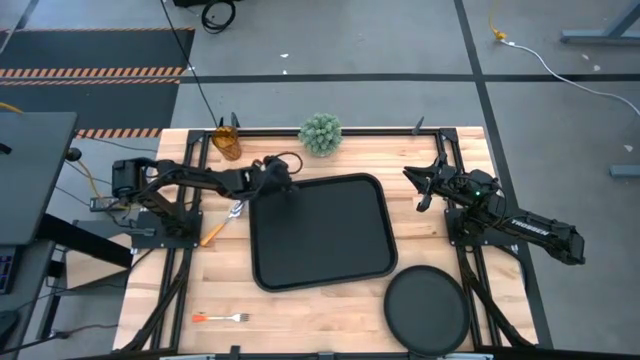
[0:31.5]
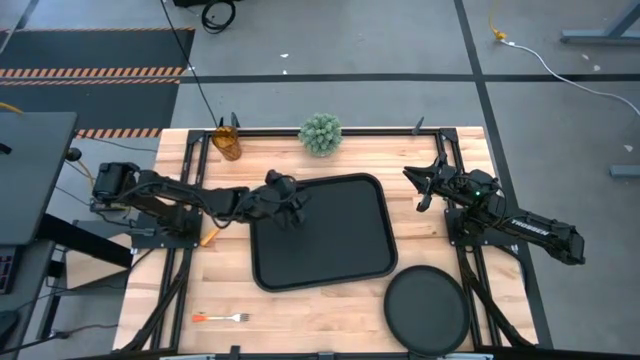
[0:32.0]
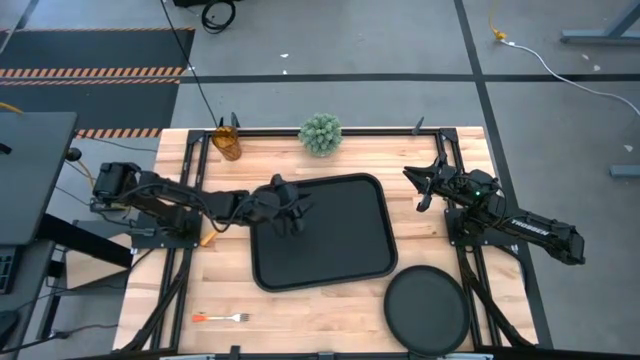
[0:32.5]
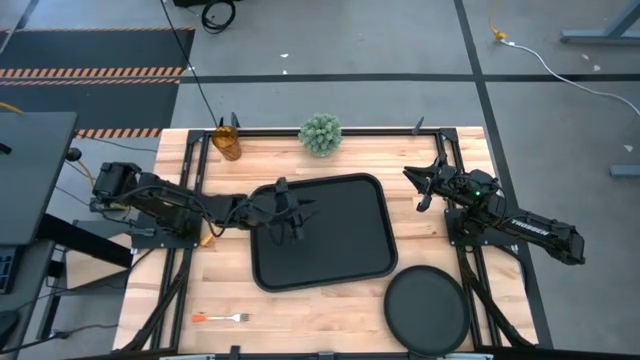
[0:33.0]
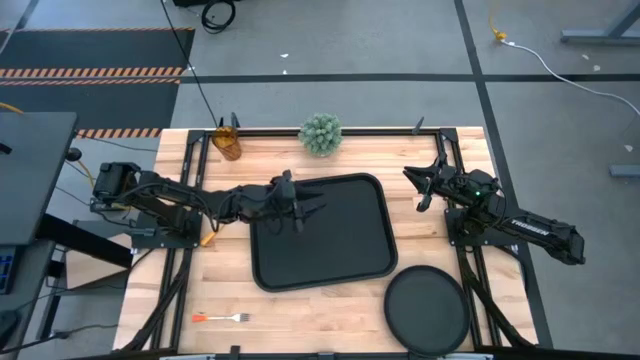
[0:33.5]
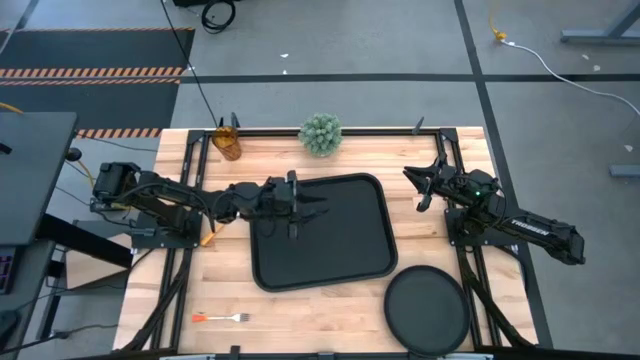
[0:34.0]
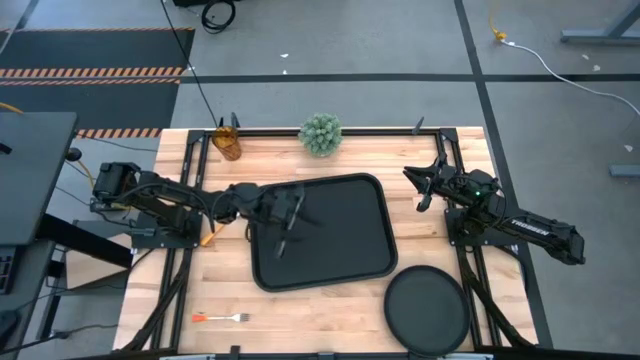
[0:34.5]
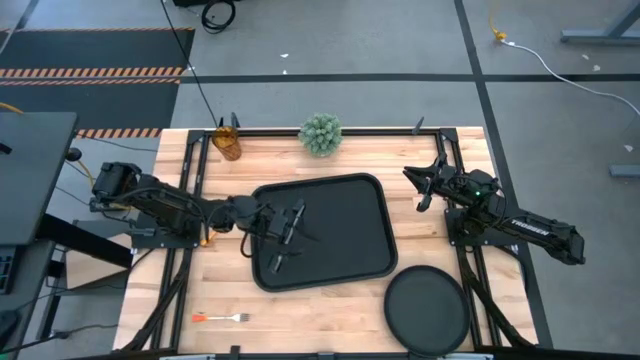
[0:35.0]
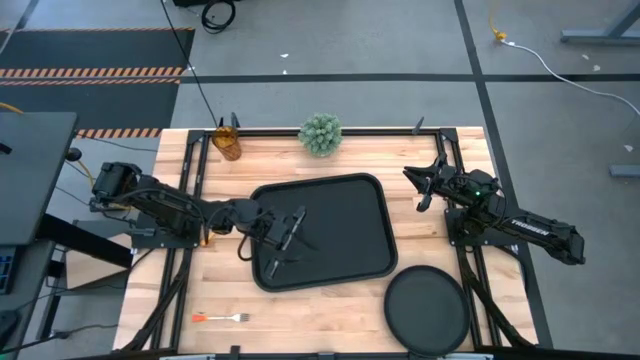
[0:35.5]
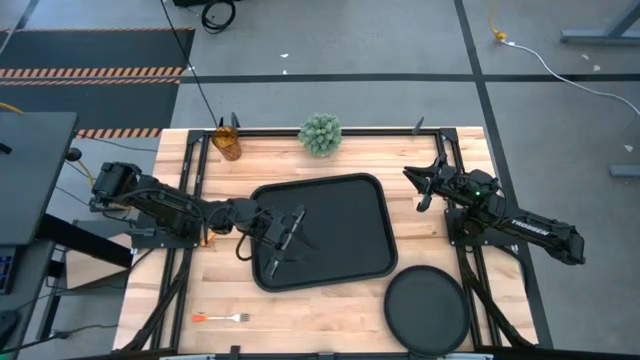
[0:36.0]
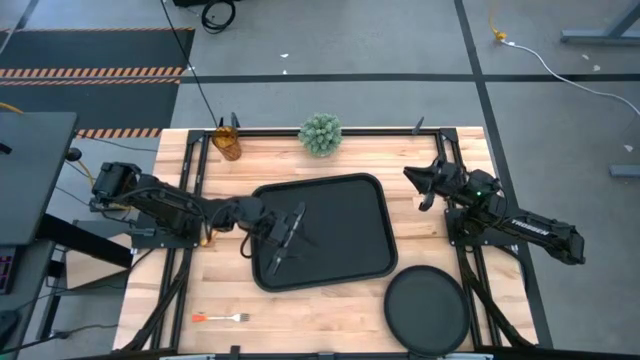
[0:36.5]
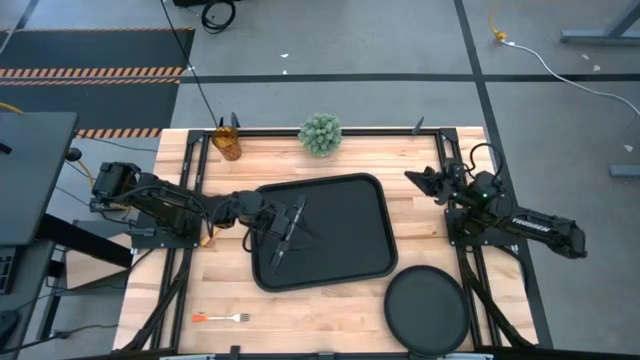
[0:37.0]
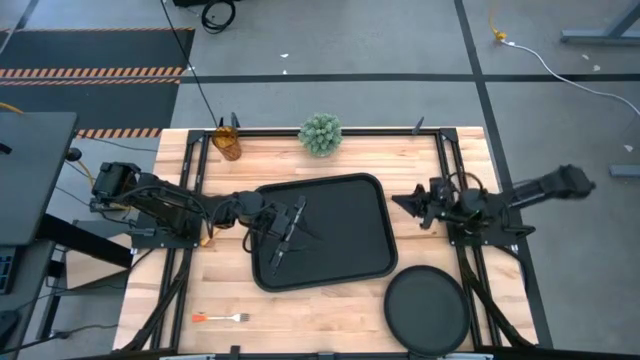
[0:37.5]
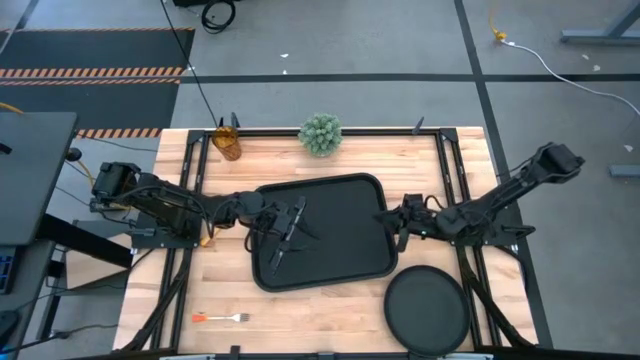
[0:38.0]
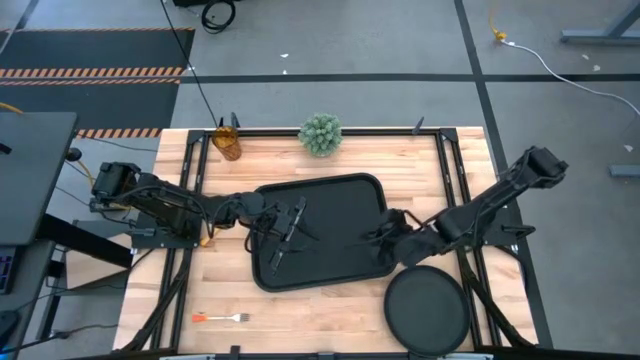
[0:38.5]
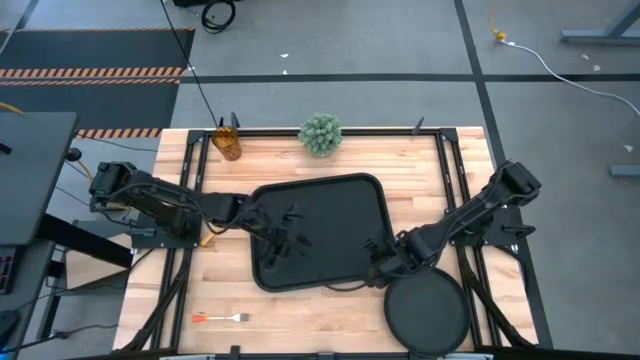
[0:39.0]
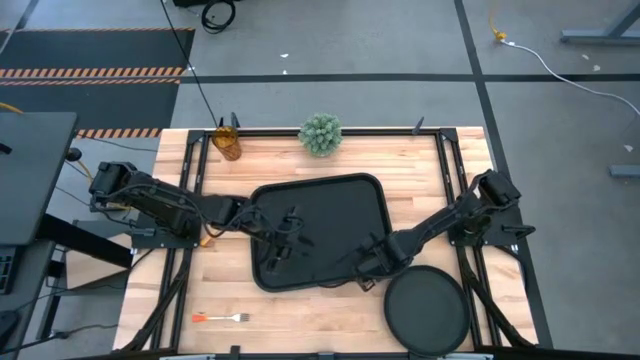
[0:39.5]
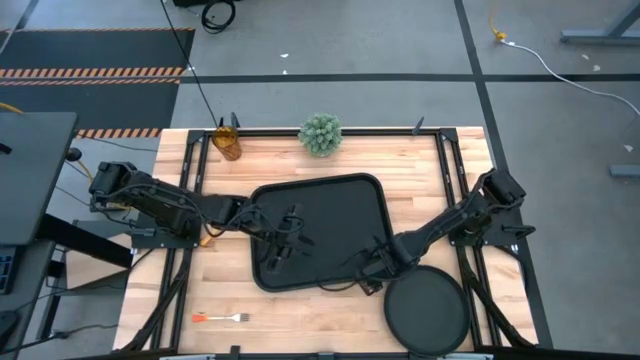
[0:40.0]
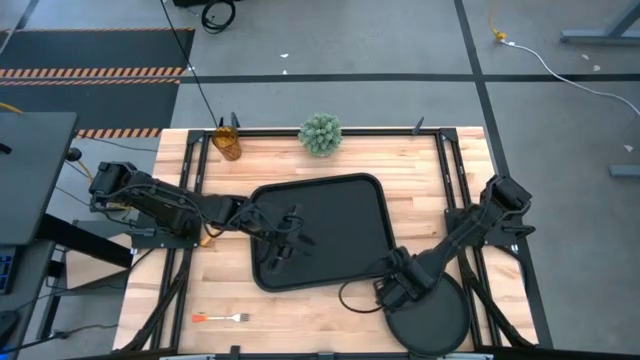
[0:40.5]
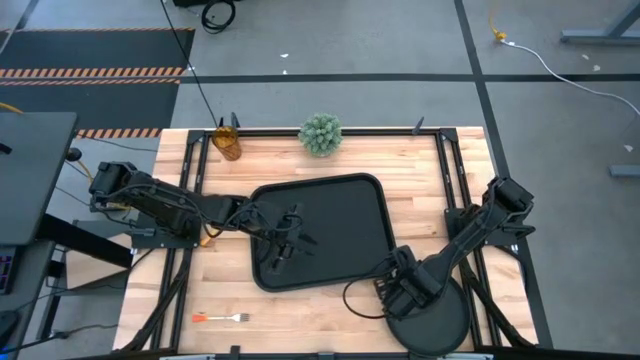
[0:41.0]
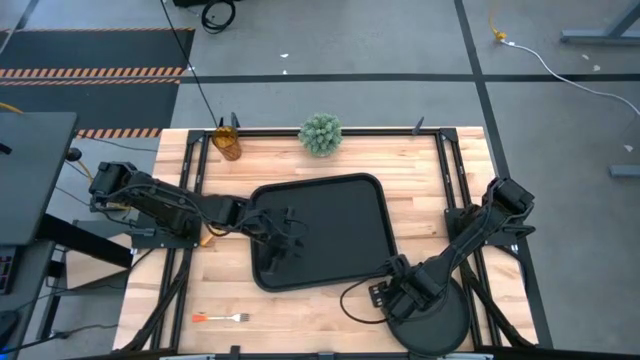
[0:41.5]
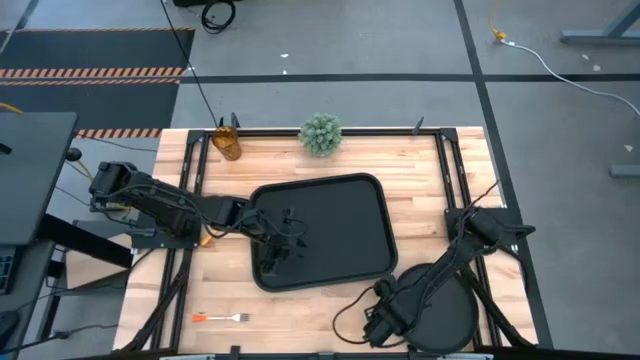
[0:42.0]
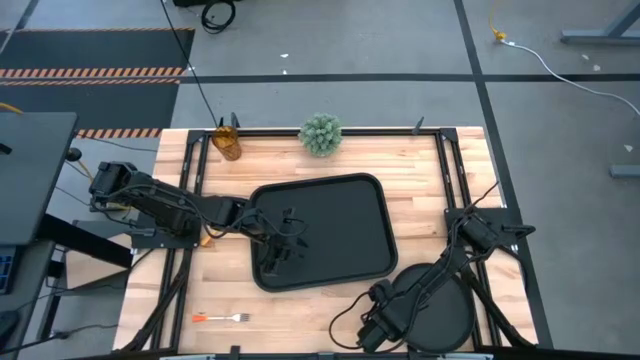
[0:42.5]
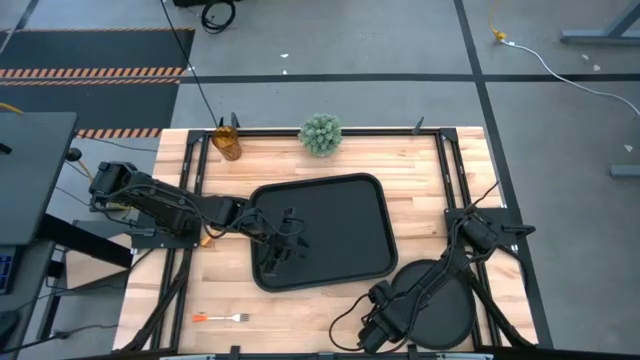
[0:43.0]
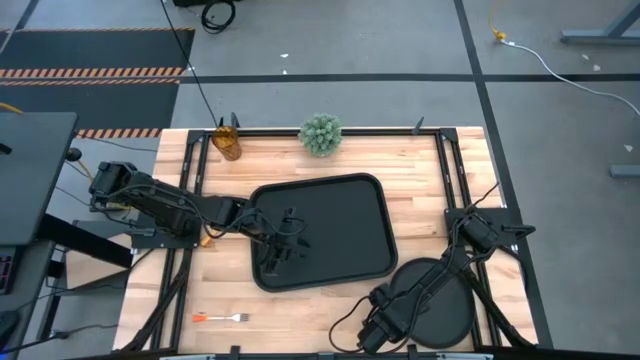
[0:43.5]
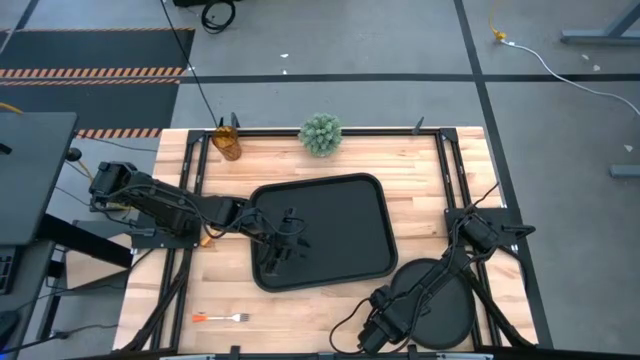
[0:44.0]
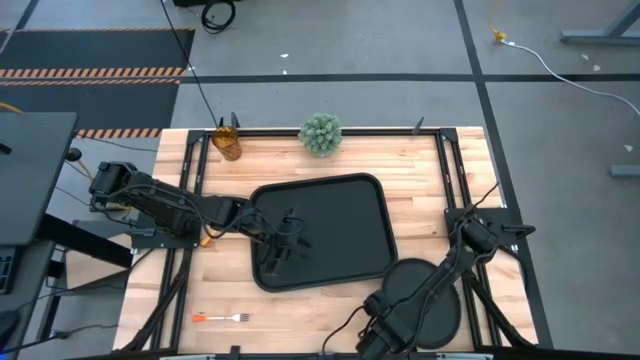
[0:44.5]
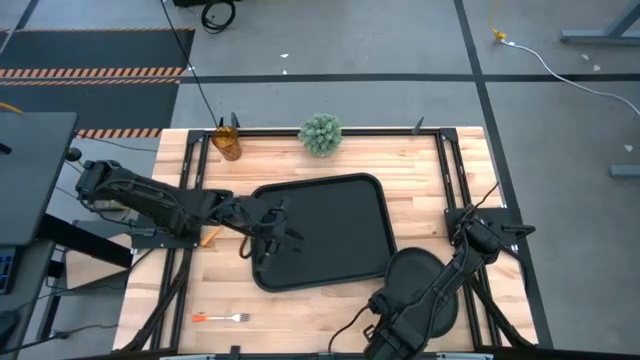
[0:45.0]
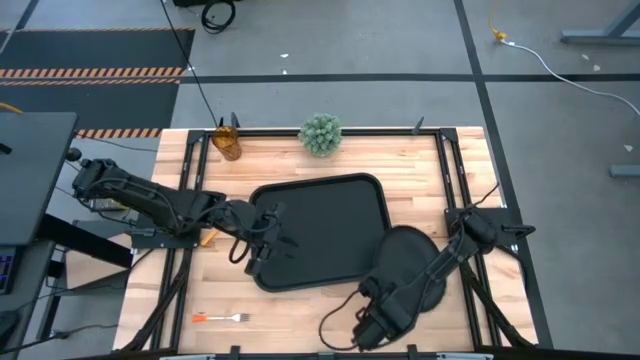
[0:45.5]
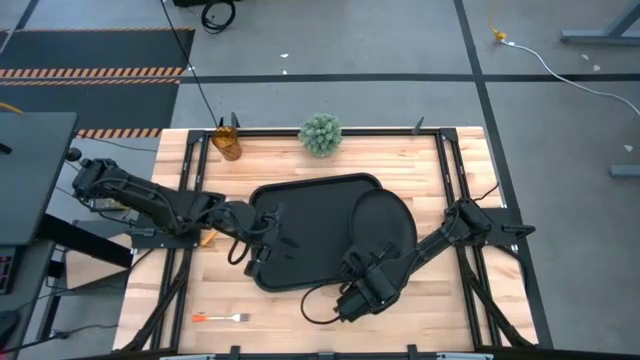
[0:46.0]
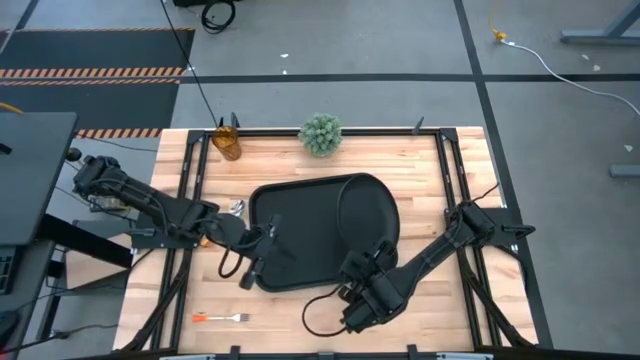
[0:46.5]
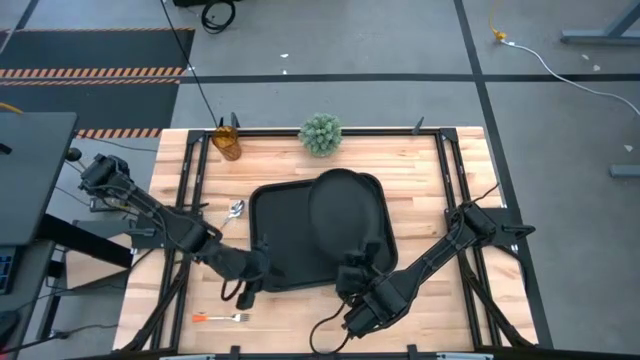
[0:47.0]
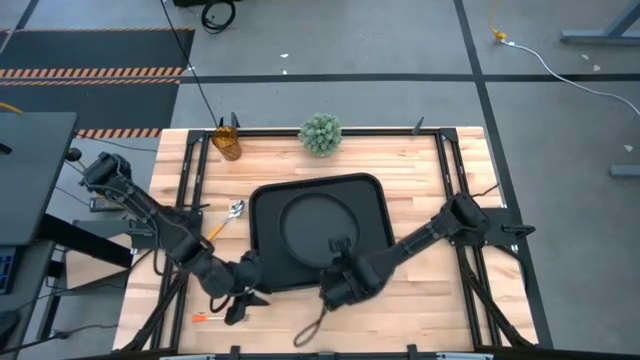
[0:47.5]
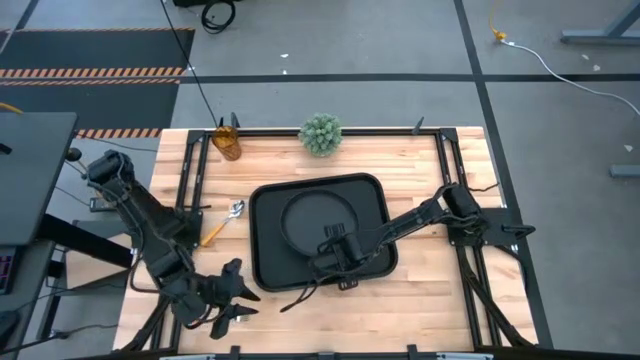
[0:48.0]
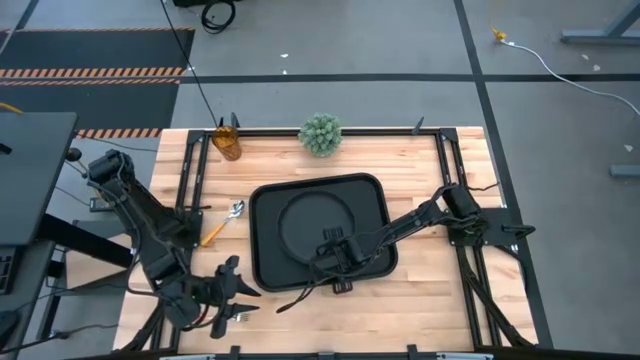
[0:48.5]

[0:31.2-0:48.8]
Task: Pick and place plate/cup/fork/spoon on tray
Put the black plate on the center of the black tray

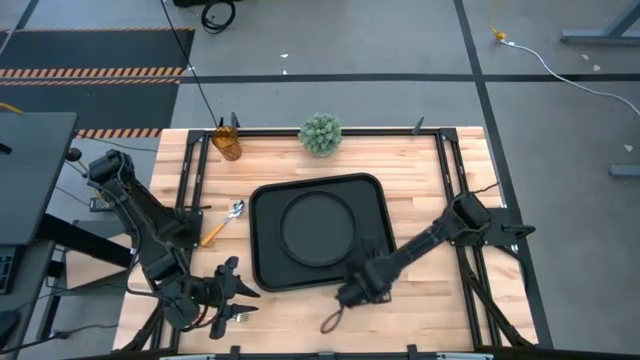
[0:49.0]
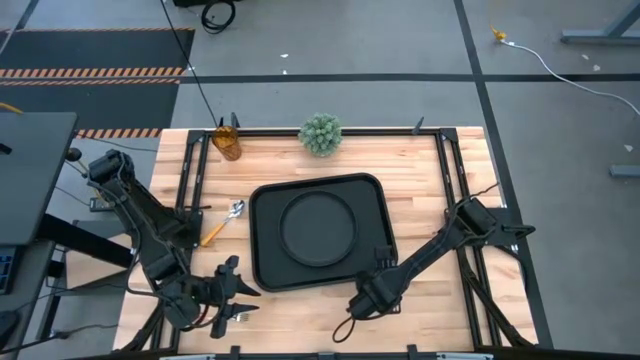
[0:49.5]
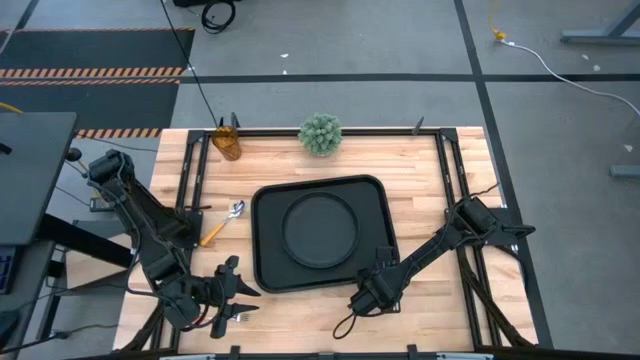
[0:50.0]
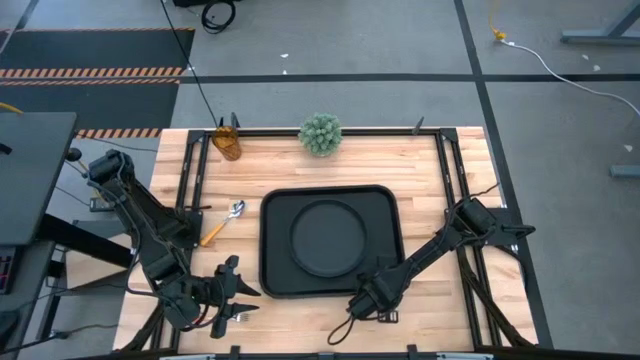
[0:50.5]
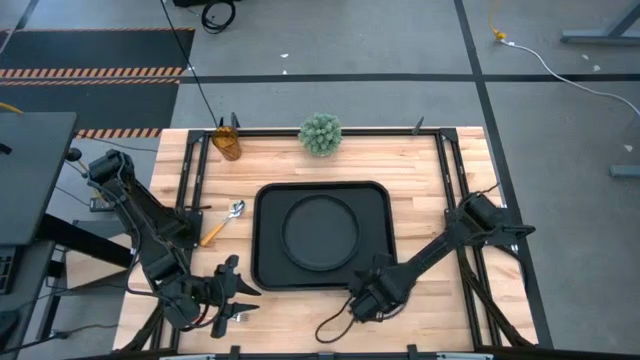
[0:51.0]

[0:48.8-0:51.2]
Adjust the black tray

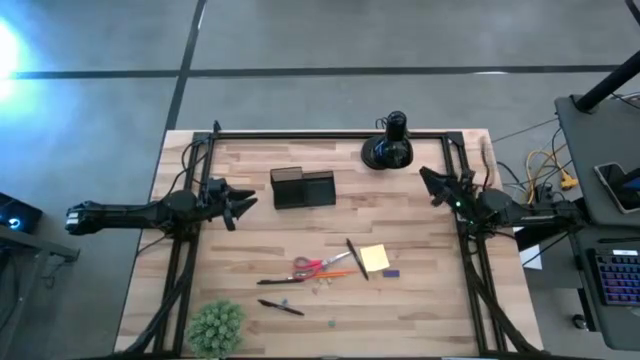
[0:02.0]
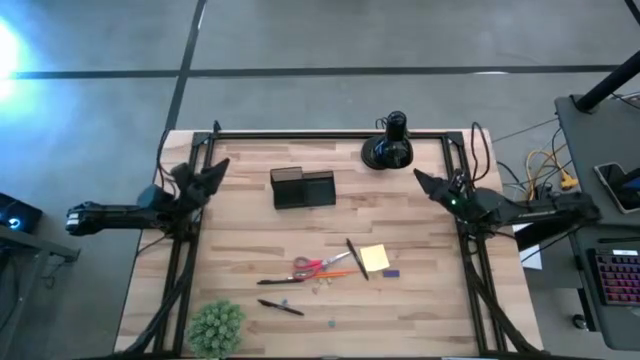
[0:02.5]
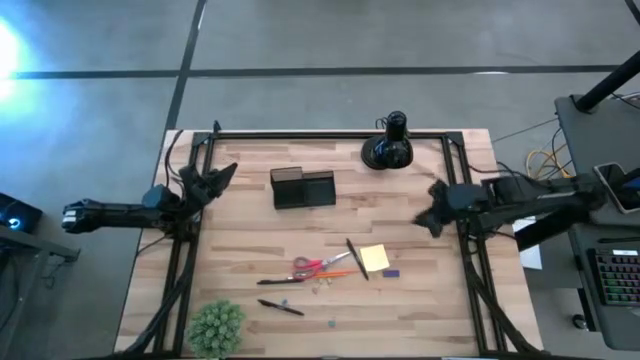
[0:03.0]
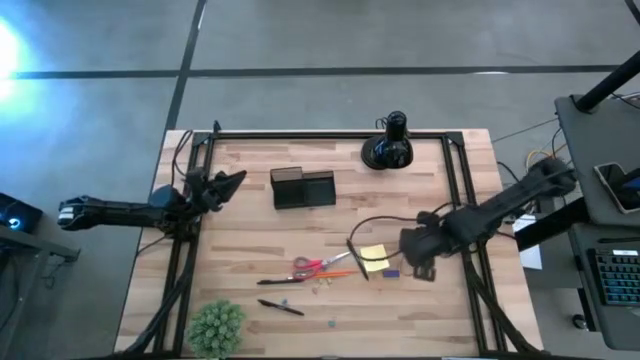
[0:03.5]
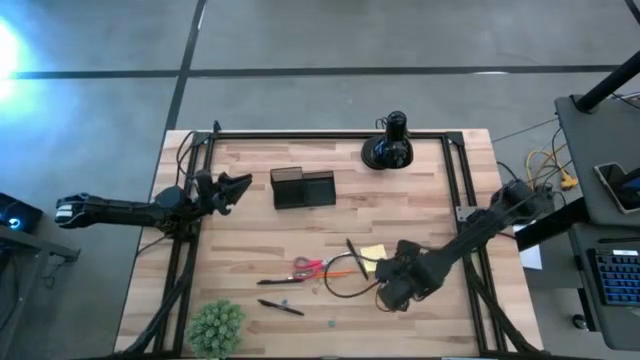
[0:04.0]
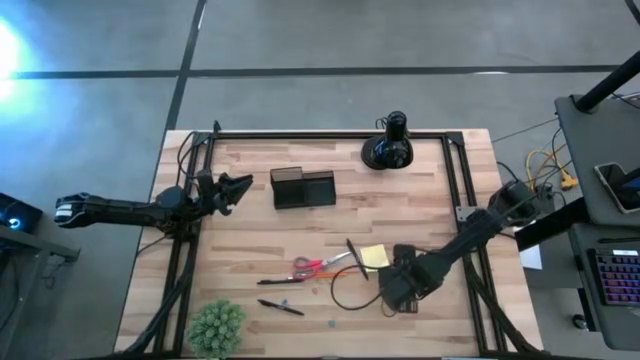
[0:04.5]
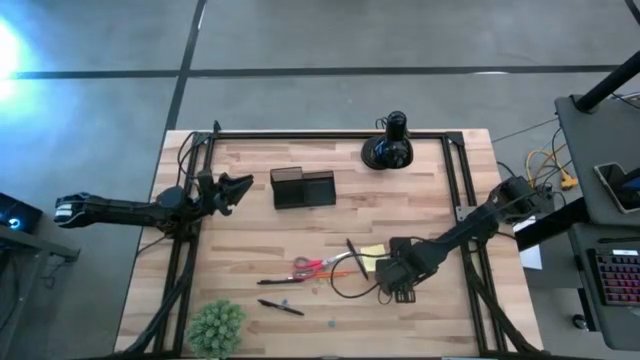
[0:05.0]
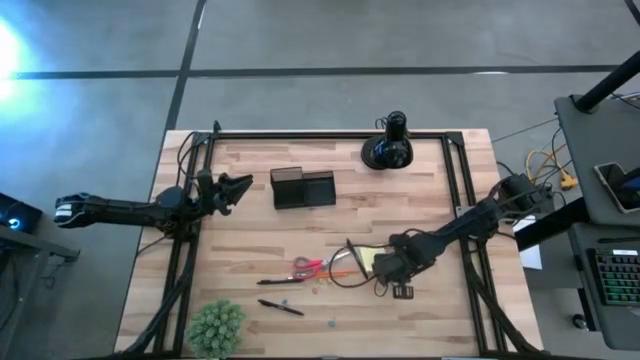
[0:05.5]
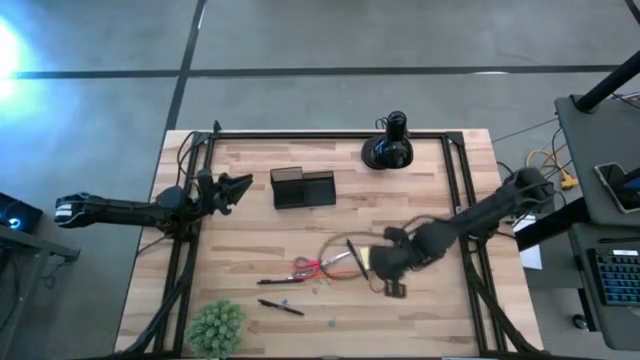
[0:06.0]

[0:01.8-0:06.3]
Task: Pick and place office supplies into organizer
Put the blue eraser into the black organizer
